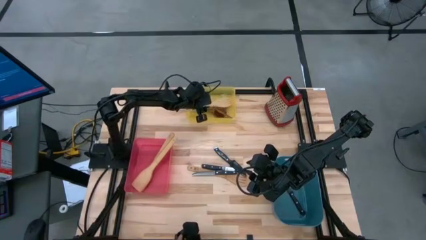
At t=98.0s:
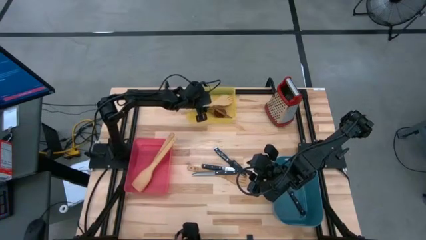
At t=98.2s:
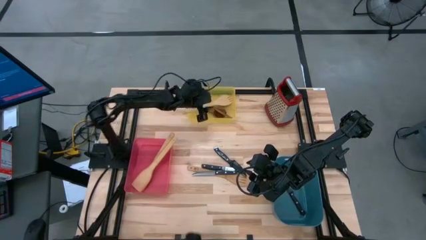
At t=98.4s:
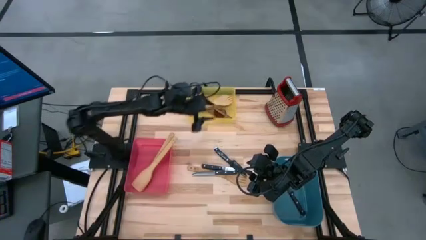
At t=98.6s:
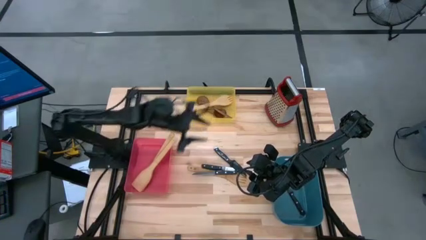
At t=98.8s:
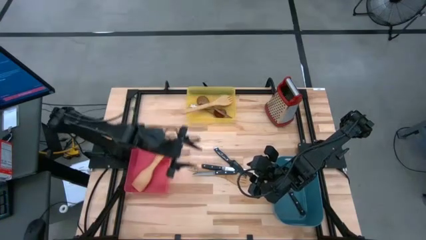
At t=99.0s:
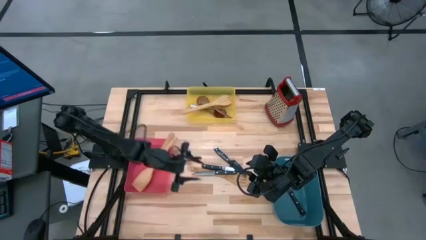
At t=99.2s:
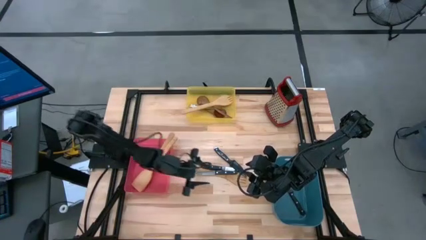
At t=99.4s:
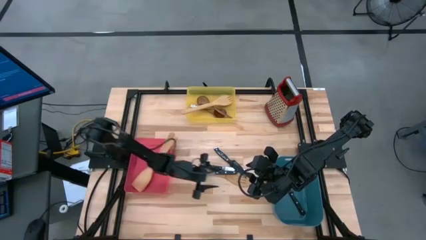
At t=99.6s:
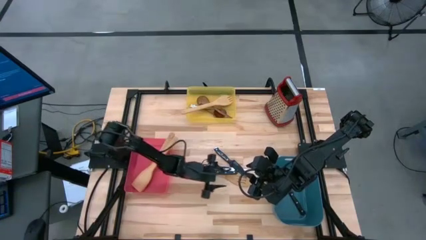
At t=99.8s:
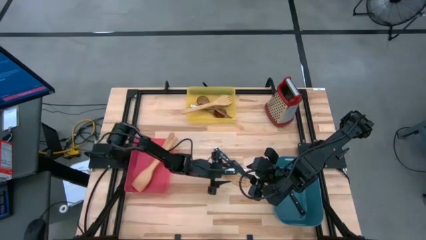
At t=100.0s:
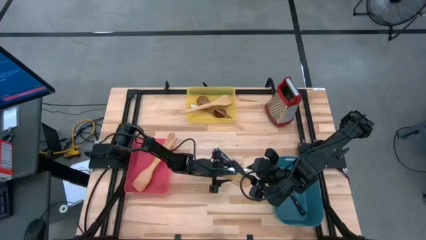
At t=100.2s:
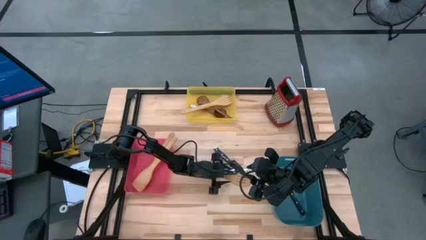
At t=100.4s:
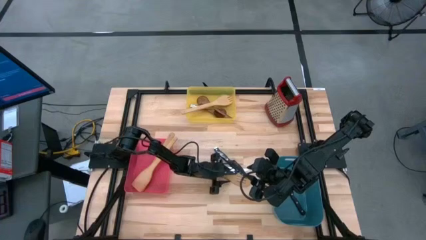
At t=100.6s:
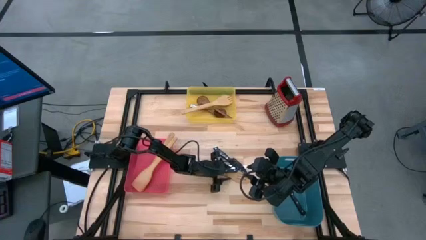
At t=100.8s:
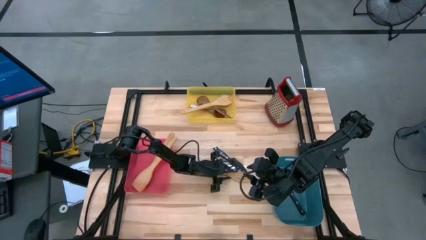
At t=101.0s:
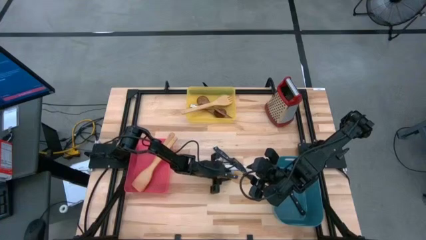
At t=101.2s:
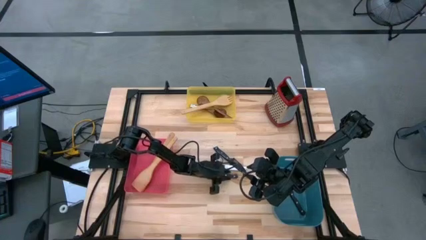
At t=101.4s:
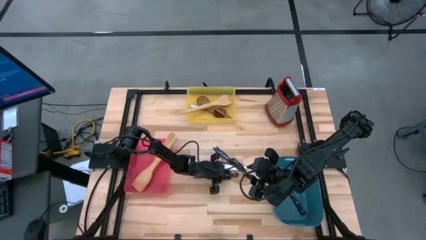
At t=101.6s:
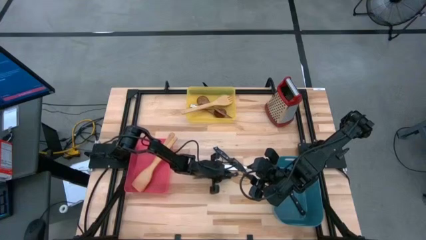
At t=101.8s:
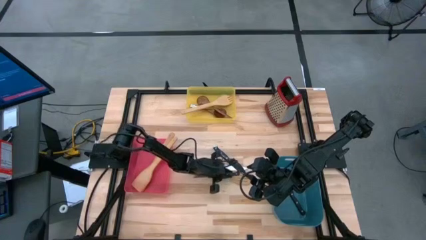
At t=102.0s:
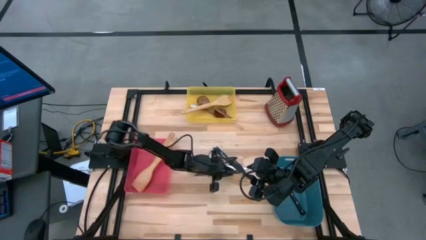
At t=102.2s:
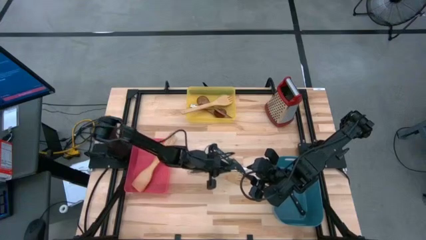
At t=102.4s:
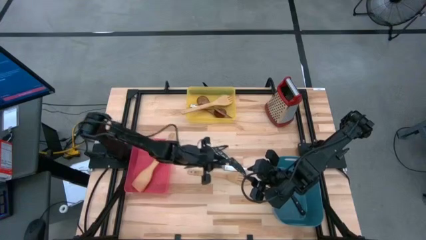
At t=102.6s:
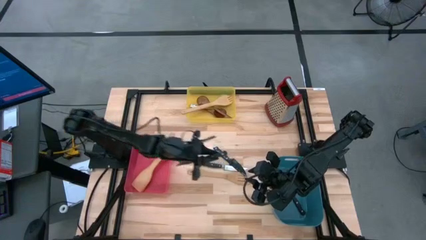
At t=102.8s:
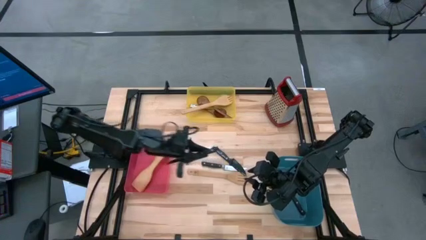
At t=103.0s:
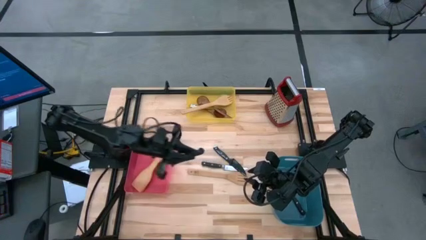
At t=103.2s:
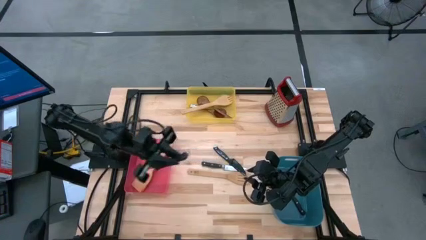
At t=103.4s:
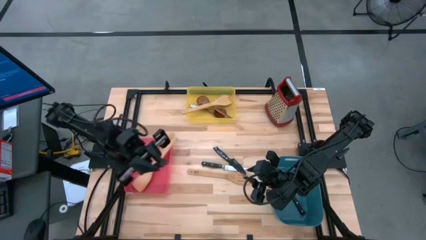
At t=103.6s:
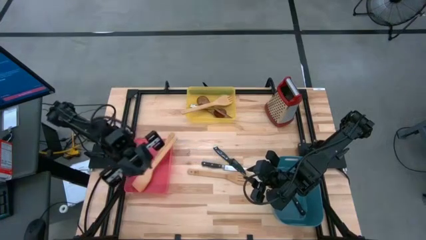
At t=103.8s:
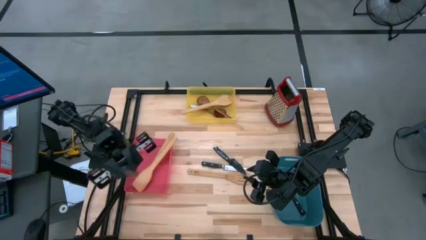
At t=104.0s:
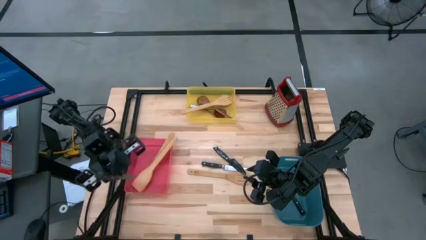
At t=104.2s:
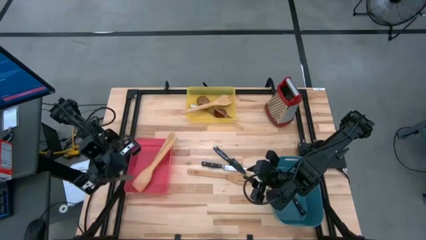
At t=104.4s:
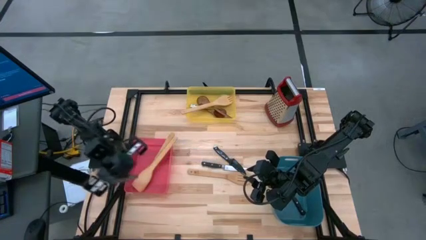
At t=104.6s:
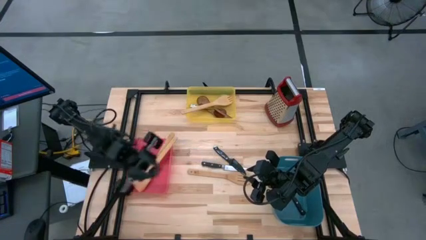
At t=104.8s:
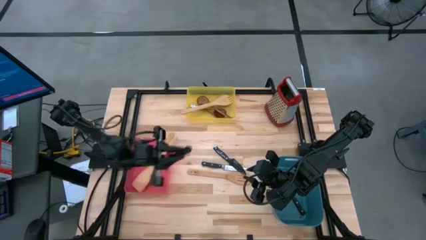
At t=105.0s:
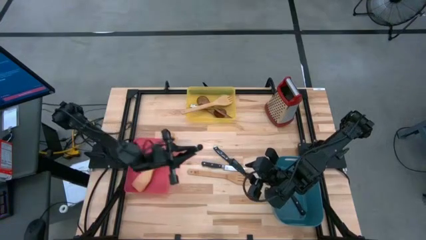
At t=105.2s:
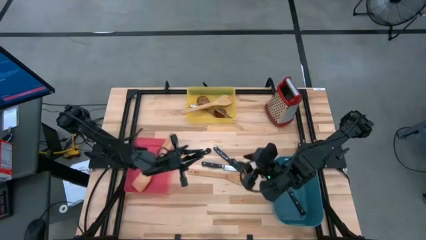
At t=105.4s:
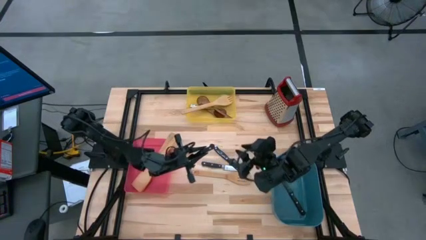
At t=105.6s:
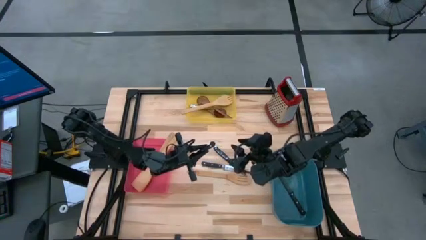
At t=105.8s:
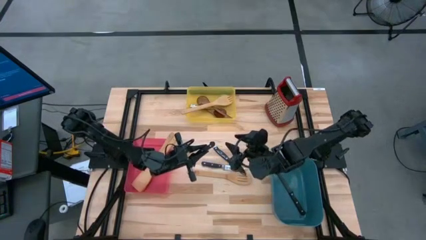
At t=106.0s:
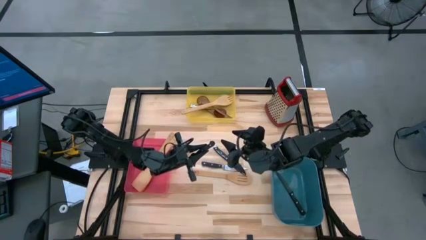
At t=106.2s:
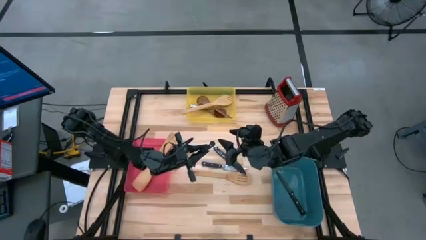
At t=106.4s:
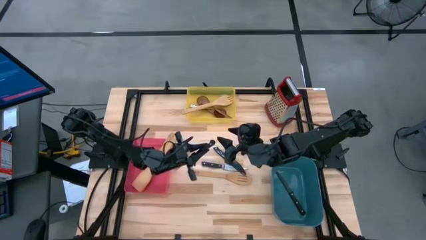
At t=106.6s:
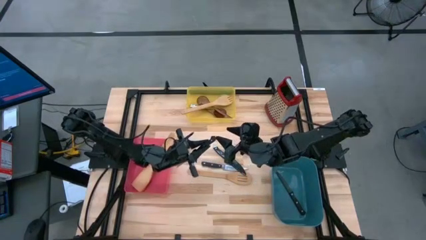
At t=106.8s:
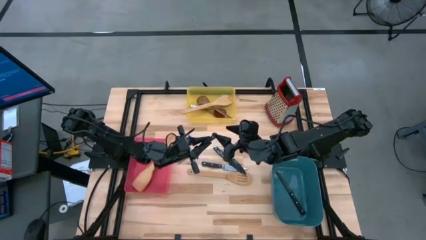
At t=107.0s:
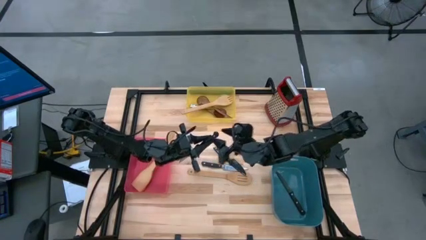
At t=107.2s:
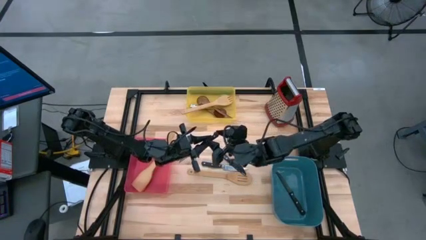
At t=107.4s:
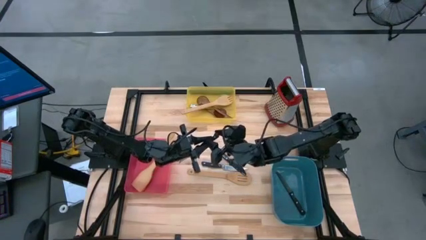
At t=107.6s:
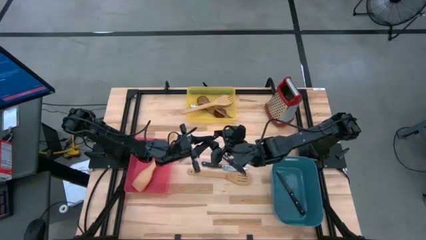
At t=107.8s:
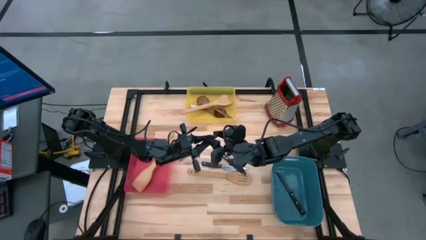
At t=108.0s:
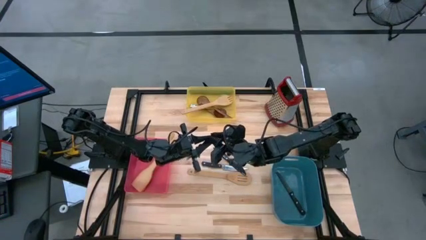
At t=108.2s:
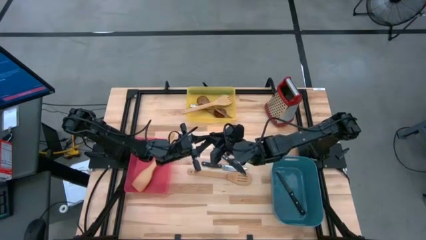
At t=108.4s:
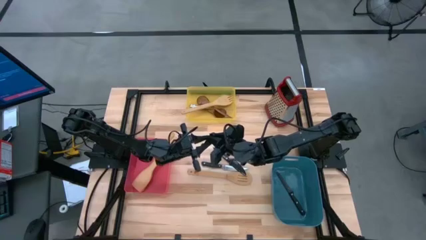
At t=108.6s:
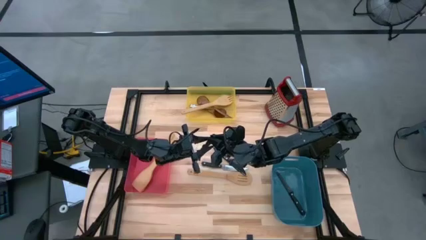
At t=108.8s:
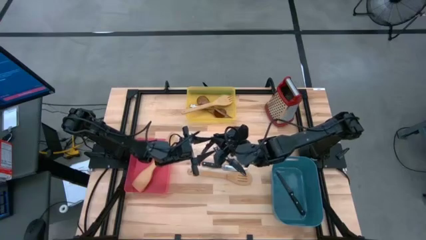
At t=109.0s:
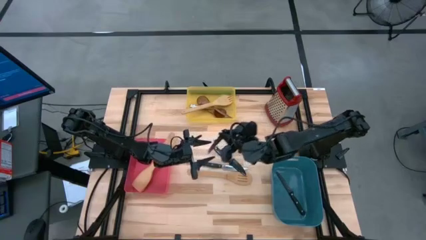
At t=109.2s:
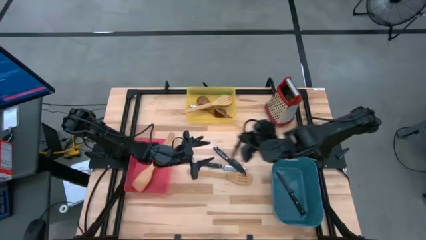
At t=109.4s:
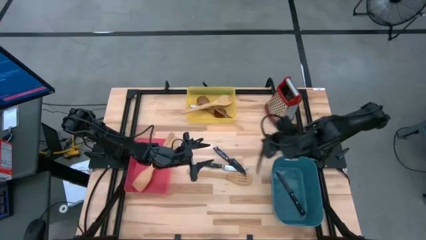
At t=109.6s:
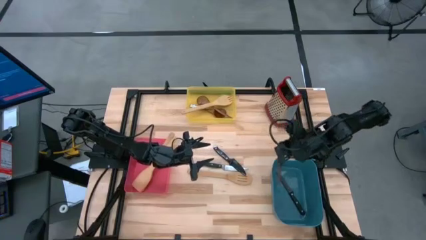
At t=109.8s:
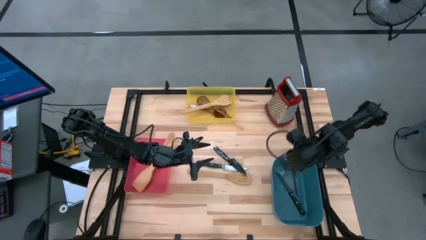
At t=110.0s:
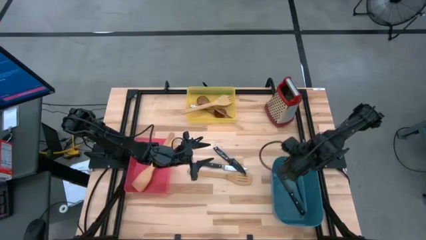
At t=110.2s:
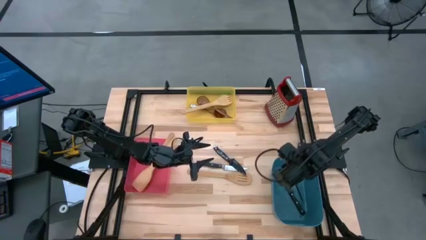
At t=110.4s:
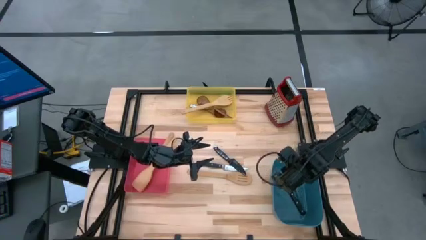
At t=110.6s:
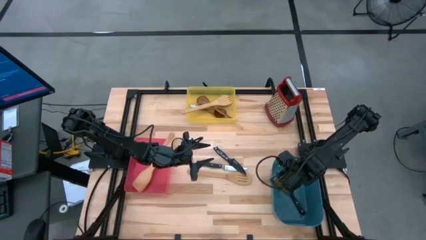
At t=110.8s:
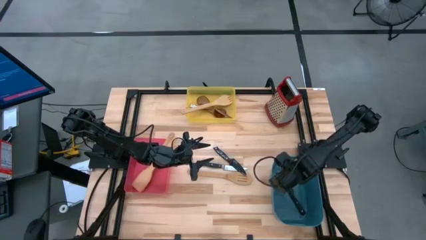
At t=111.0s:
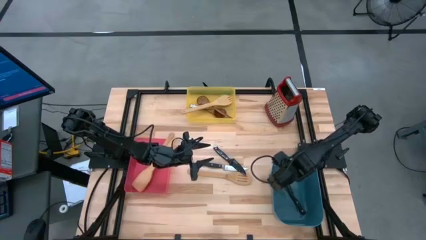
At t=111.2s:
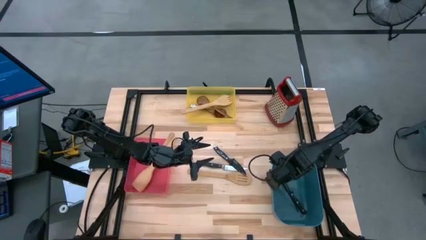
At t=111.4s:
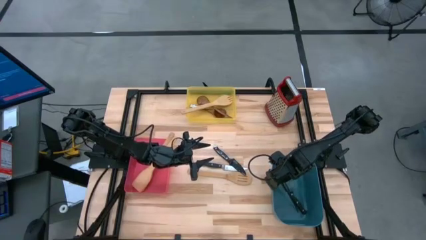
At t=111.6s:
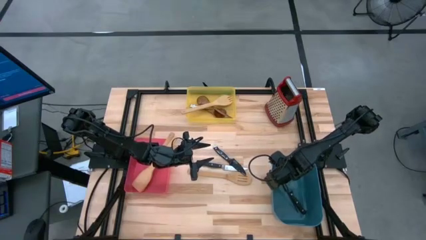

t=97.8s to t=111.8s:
Task: Pick & Place Kitchen Items
Put the black knife into the blue bin

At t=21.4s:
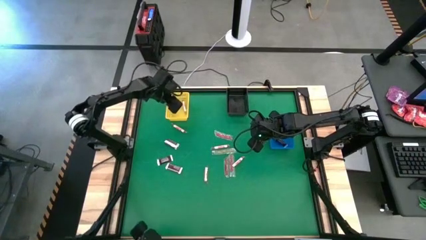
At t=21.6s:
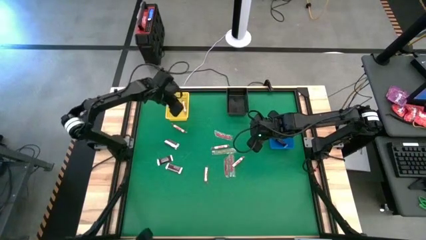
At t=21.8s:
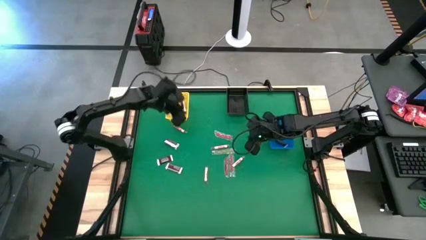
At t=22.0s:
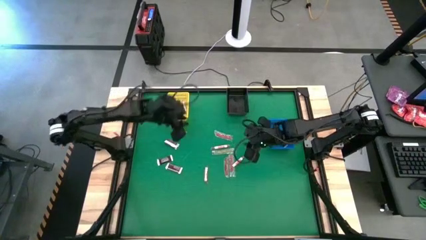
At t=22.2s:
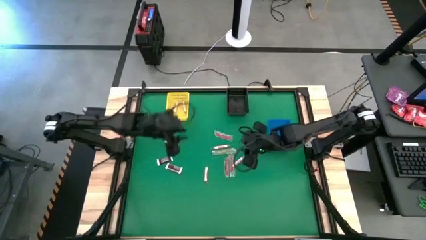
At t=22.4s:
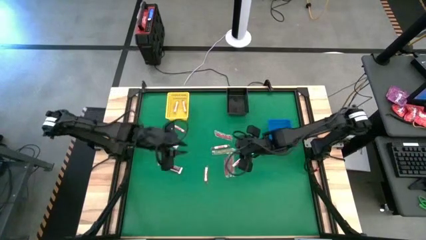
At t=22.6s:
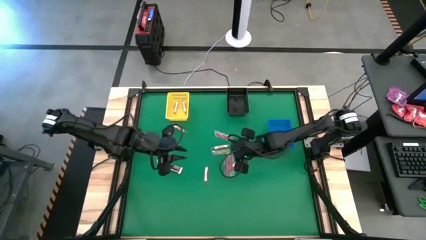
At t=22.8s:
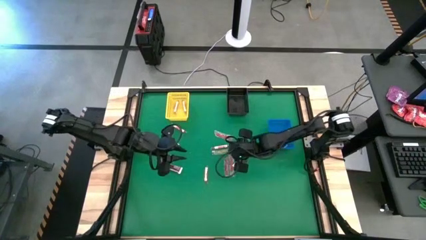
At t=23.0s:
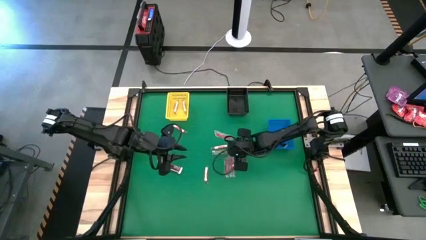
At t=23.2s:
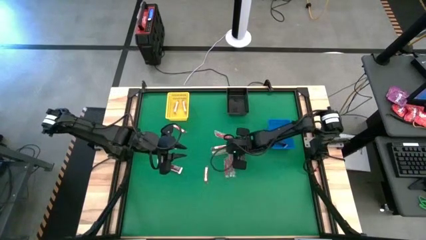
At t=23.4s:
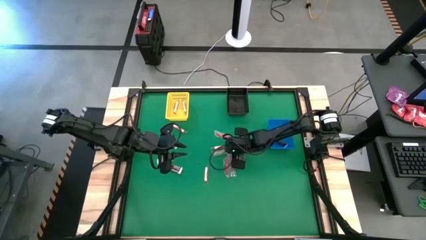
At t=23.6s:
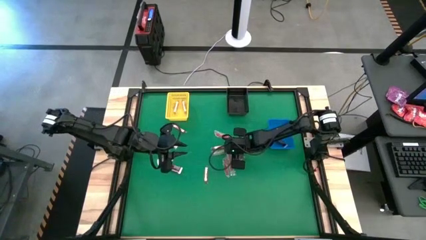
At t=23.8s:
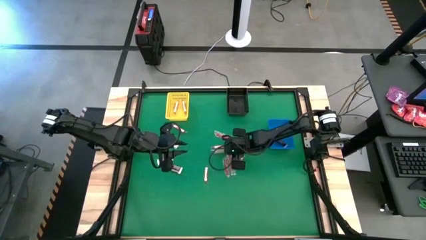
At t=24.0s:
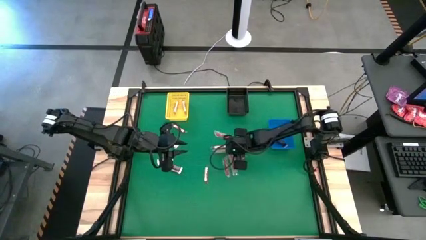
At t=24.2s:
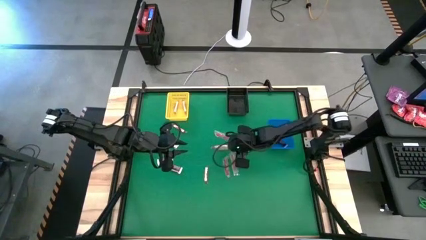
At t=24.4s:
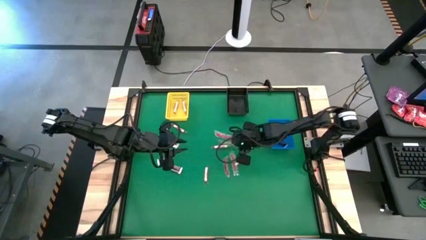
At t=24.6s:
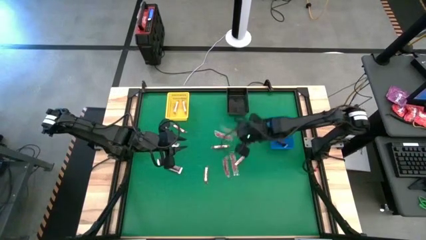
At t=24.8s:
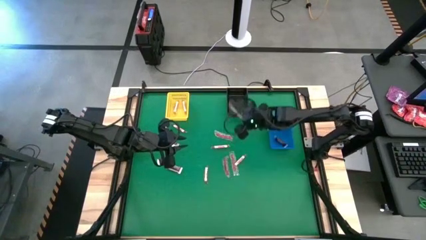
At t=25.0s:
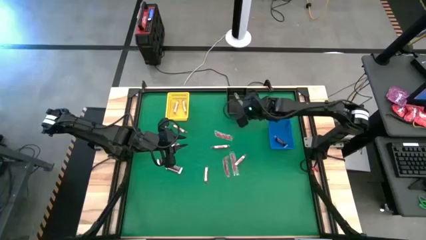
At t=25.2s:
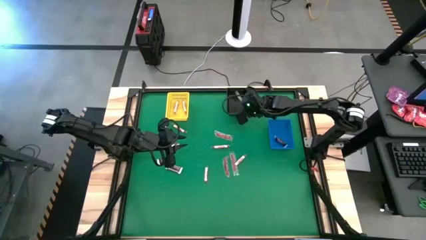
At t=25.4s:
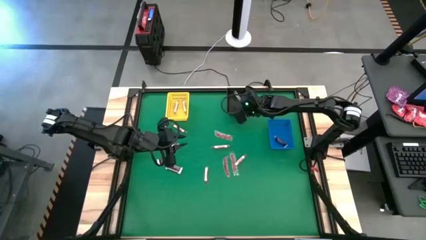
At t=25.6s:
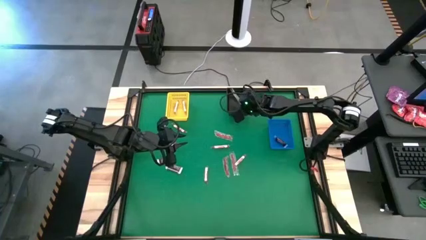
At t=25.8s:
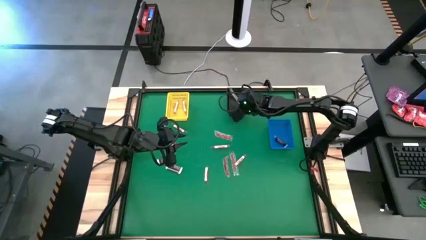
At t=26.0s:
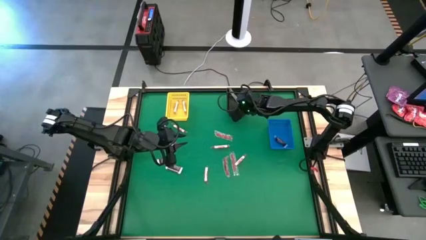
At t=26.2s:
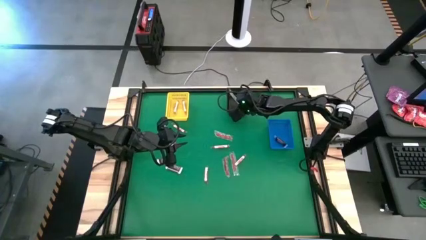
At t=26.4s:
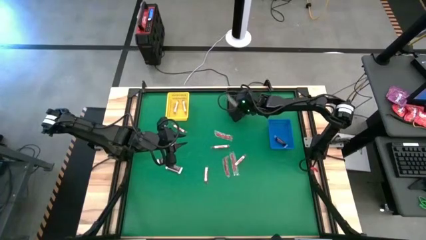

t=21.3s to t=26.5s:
Task: Sort candy by brand, put in halloween buckets
Put the green candy into the black basket
